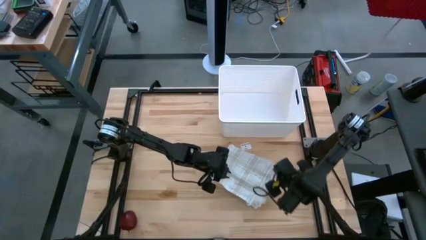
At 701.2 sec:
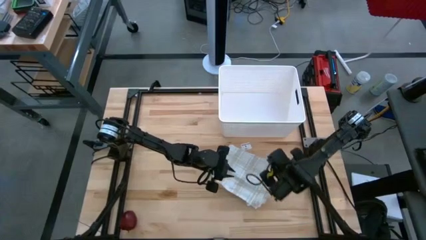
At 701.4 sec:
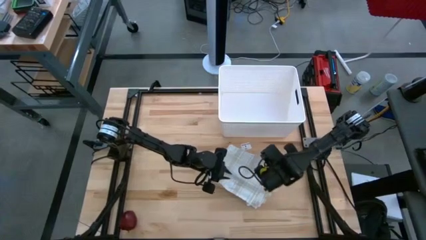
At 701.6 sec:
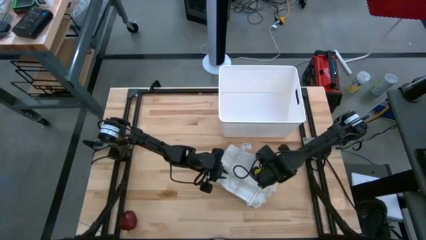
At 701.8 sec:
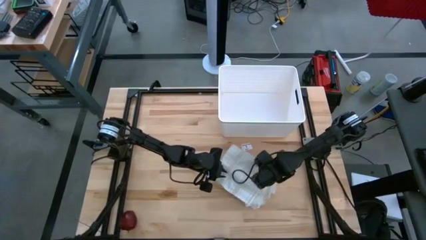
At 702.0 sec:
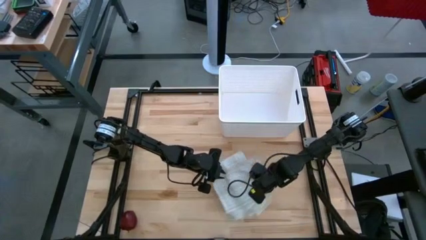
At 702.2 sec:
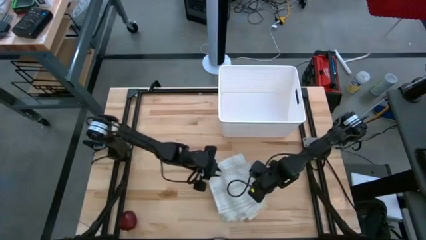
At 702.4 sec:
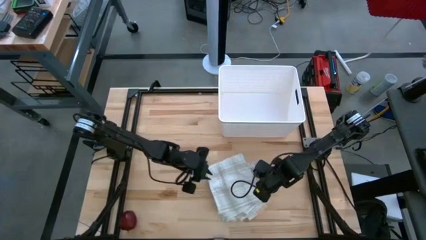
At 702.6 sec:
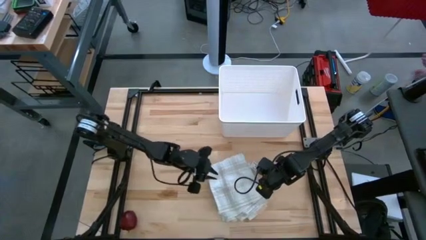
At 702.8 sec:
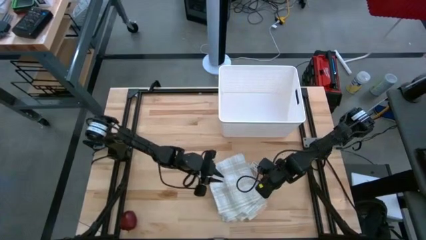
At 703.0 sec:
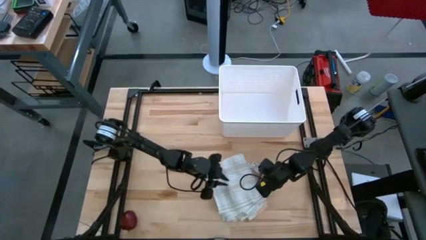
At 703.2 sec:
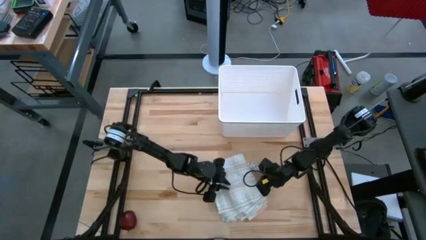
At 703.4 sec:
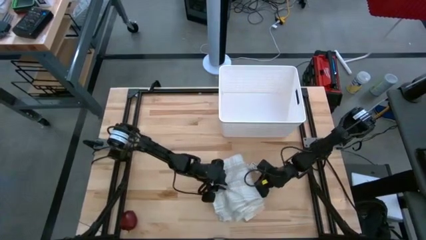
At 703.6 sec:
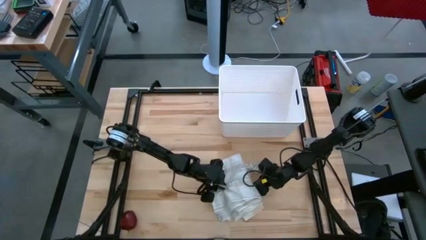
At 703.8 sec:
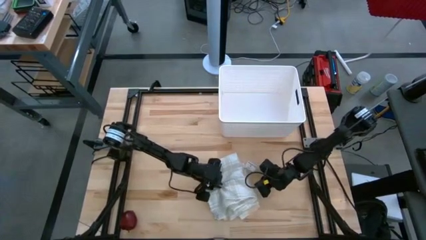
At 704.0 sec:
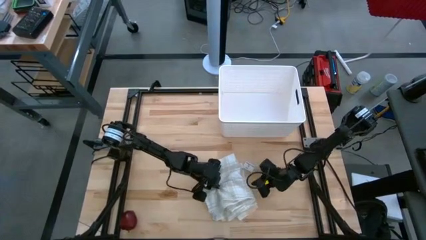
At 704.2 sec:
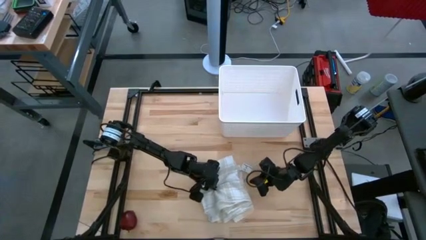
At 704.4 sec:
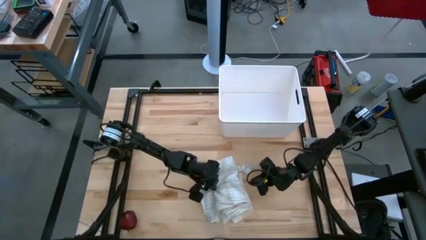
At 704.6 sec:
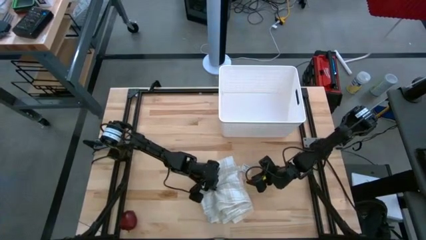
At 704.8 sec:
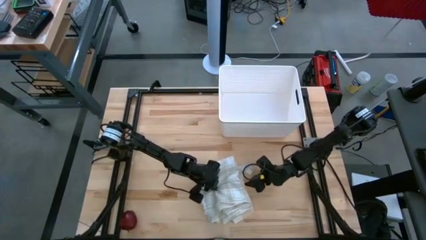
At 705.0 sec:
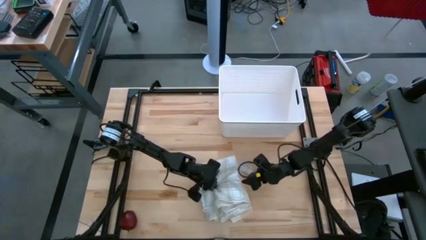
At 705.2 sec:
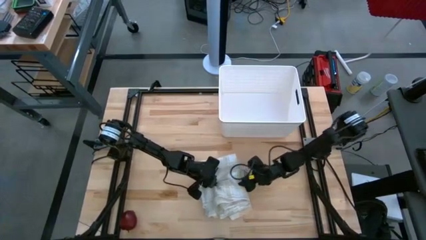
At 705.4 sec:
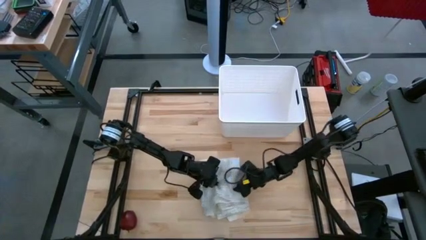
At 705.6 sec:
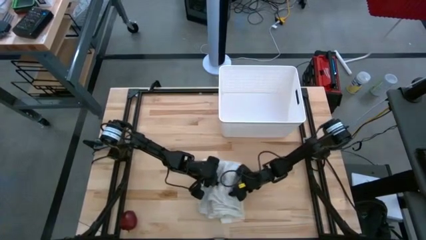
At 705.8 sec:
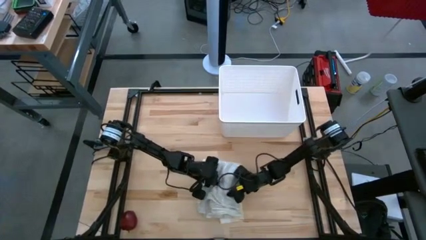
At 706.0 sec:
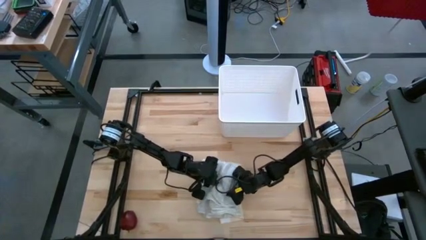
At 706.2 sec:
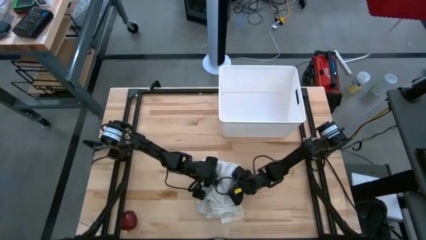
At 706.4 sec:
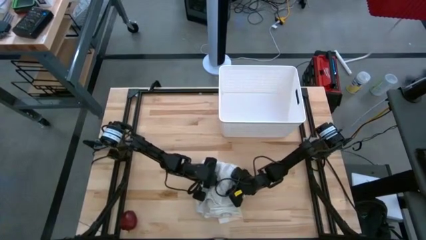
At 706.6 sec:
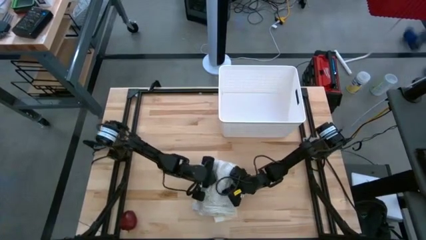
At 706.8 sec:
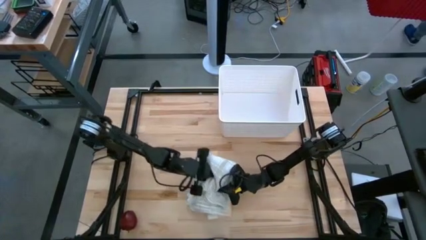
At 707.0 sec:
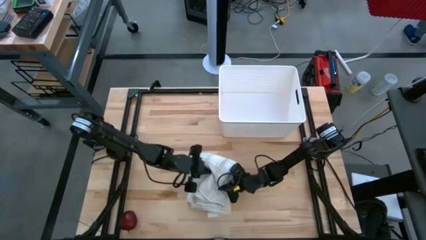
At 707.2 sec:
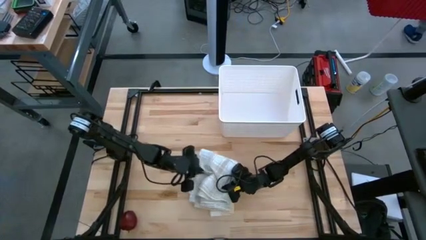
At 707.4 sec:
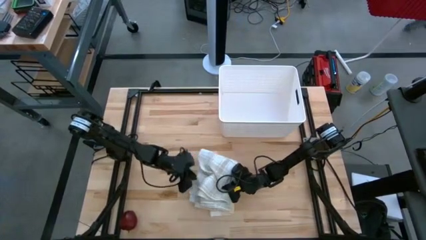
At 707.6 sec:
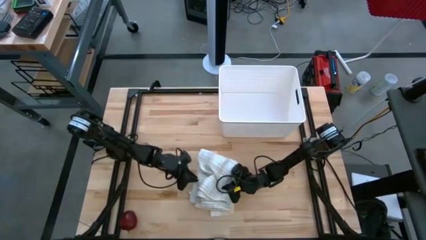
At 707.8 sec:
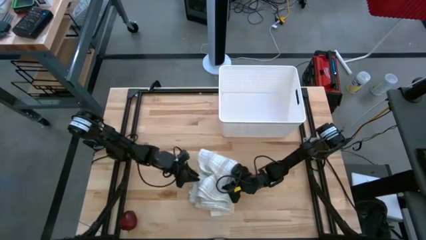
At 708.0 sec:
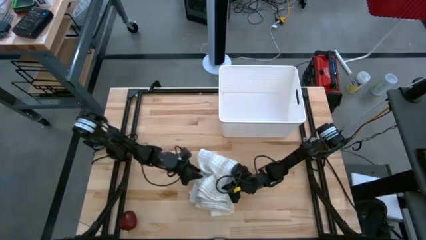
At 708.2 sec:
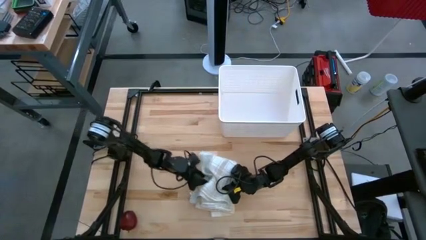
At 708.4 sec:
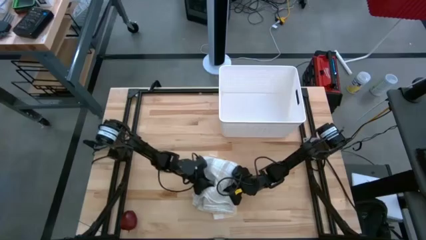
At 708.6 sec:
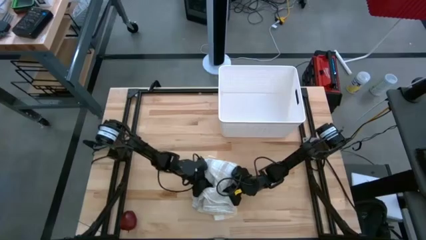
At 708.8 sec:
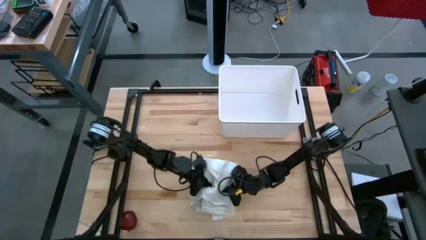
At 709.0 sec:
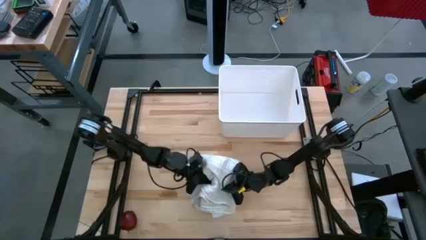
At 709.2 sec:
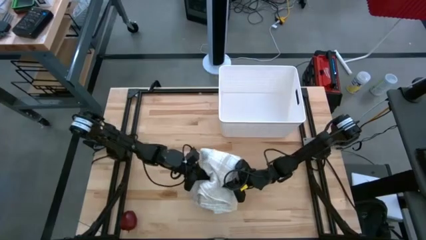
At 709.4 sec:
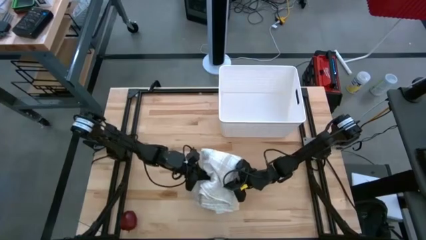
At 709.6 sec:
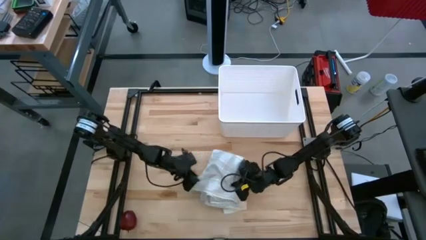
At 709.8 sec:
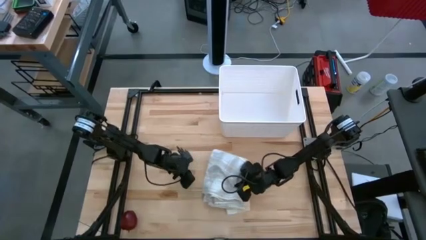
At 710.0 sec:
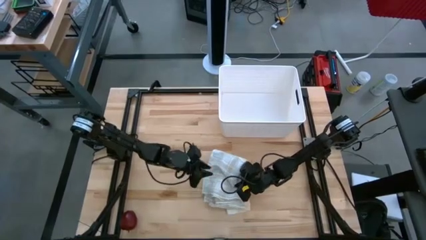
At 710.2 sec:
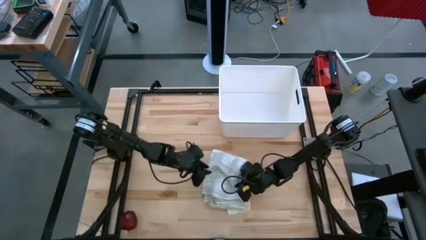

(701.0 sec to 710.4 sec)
Task: Fold towel
Put the stack of towels into the laundry bin

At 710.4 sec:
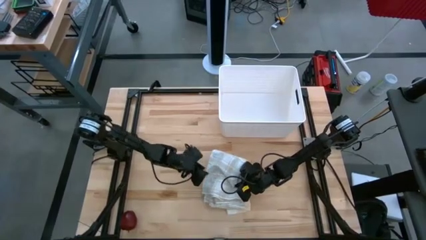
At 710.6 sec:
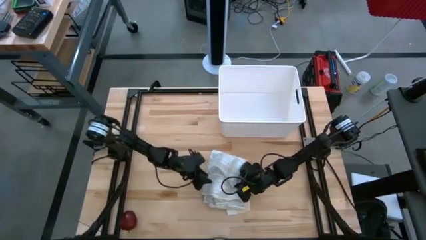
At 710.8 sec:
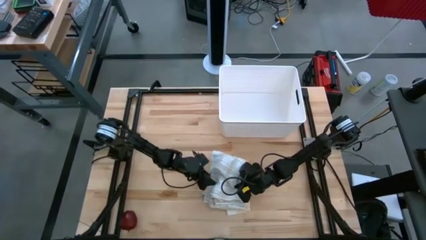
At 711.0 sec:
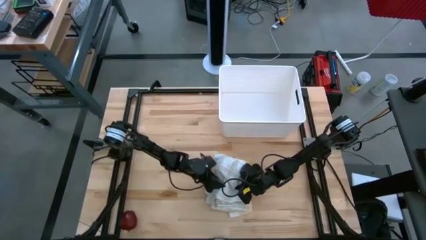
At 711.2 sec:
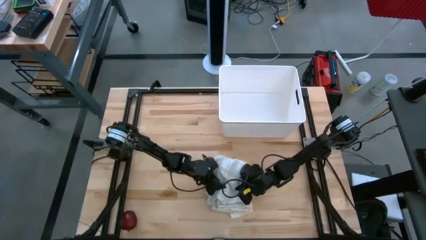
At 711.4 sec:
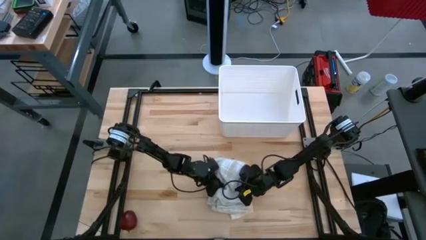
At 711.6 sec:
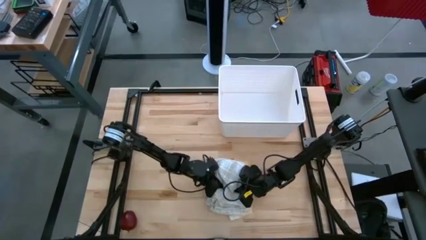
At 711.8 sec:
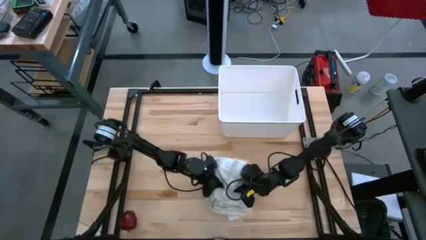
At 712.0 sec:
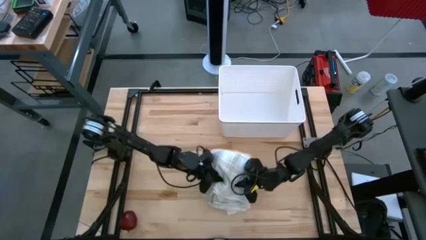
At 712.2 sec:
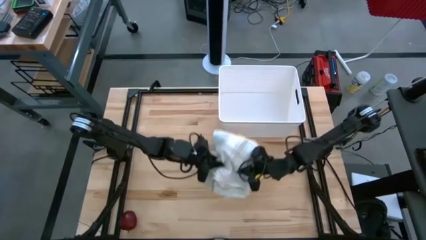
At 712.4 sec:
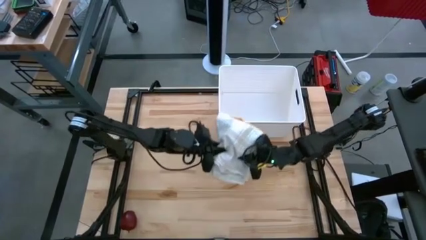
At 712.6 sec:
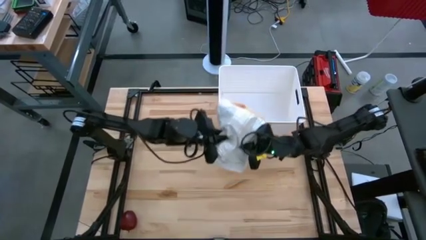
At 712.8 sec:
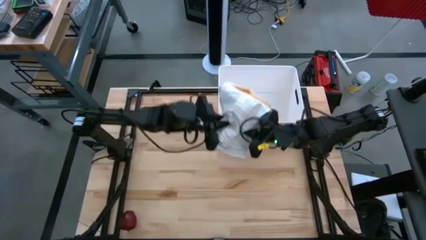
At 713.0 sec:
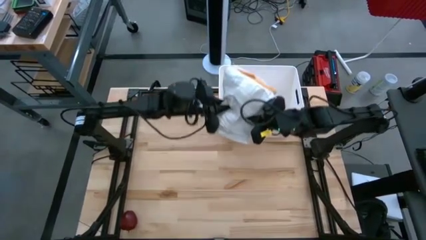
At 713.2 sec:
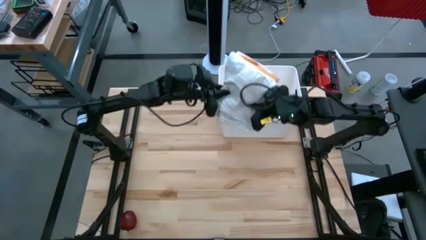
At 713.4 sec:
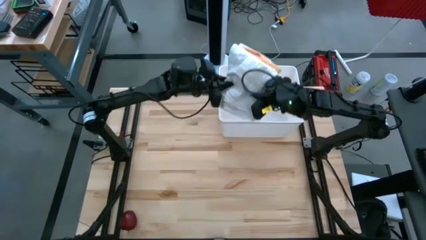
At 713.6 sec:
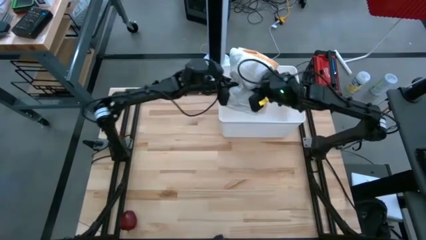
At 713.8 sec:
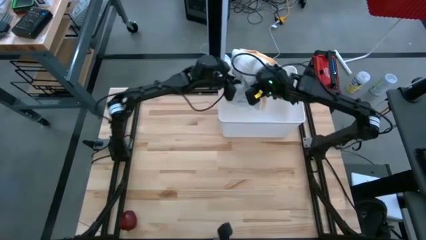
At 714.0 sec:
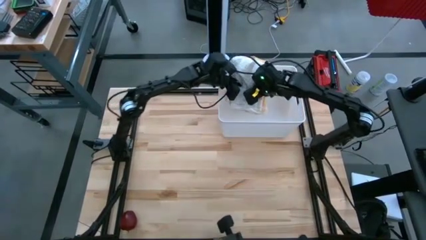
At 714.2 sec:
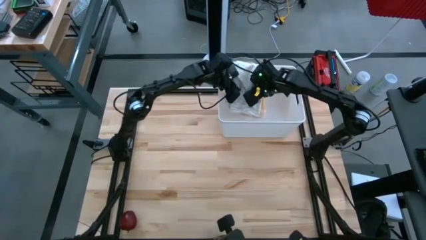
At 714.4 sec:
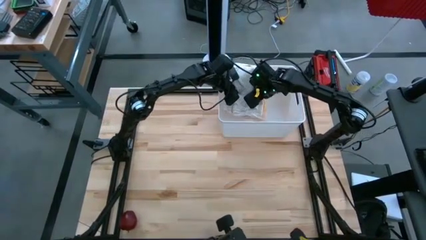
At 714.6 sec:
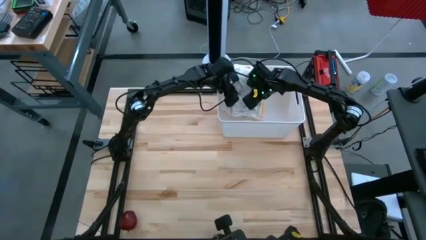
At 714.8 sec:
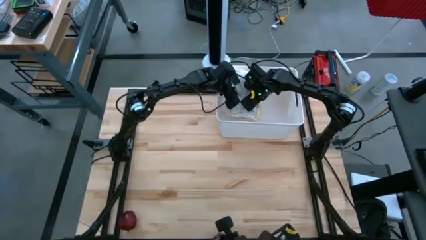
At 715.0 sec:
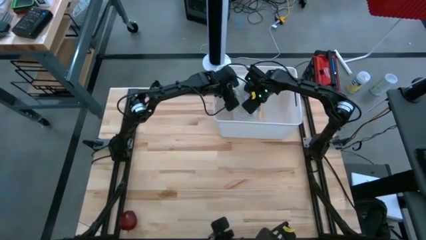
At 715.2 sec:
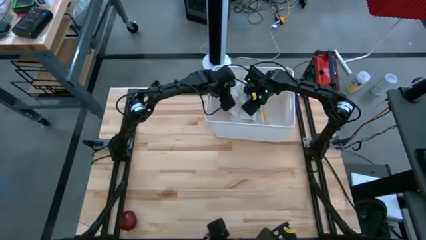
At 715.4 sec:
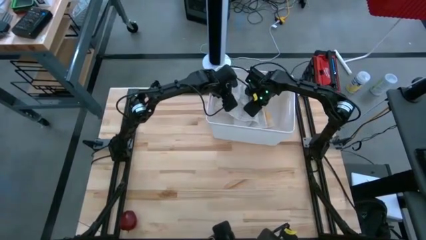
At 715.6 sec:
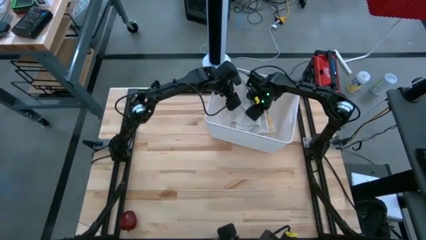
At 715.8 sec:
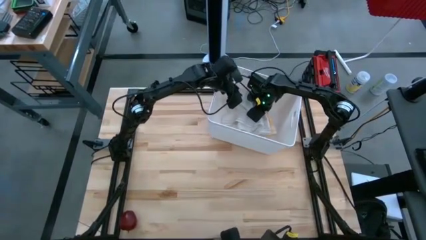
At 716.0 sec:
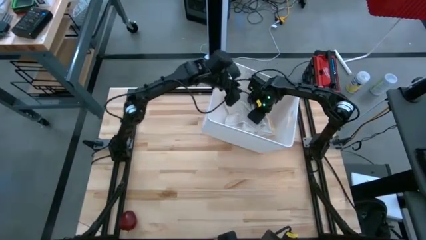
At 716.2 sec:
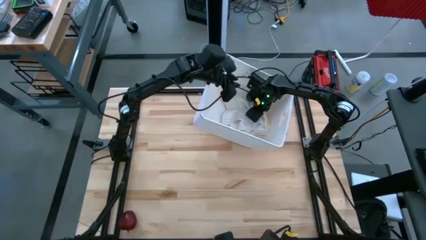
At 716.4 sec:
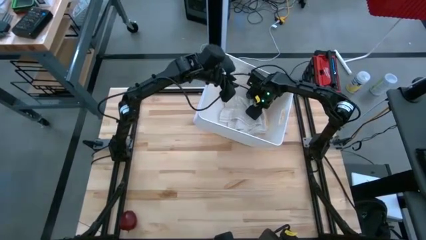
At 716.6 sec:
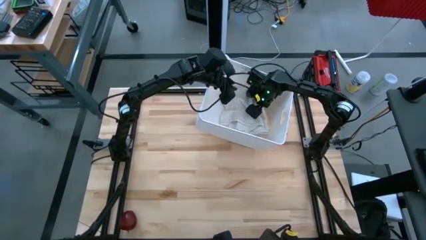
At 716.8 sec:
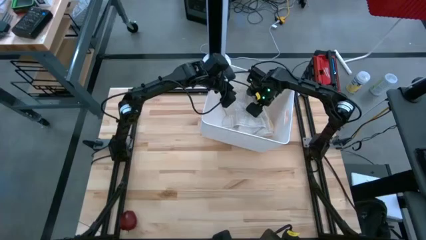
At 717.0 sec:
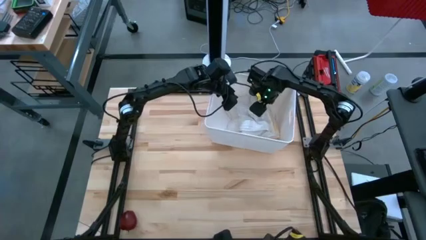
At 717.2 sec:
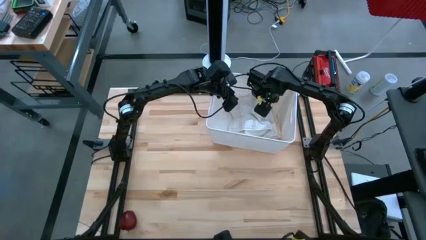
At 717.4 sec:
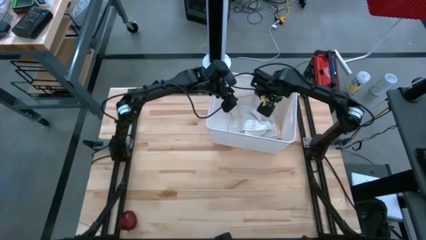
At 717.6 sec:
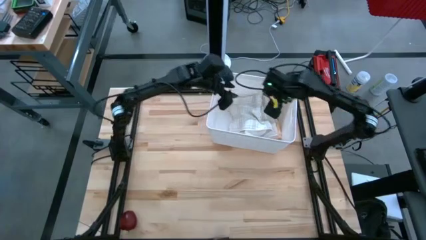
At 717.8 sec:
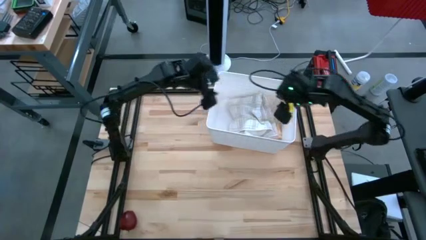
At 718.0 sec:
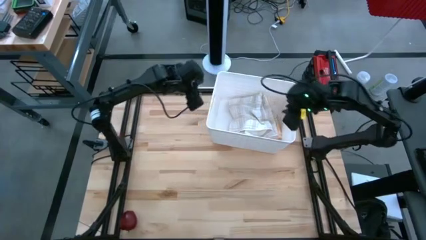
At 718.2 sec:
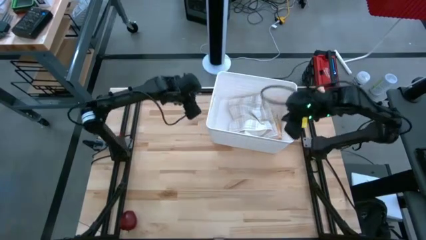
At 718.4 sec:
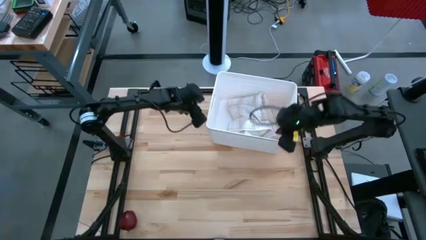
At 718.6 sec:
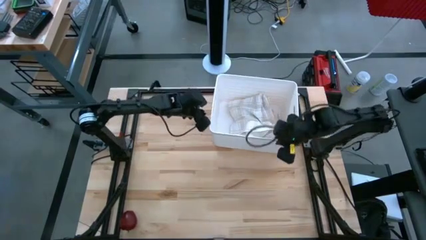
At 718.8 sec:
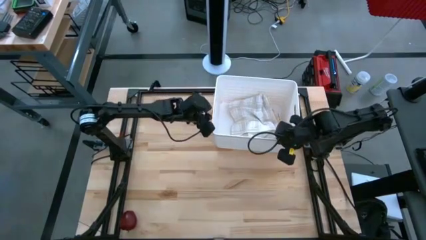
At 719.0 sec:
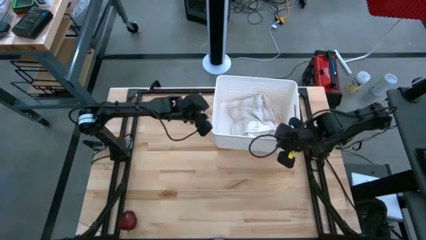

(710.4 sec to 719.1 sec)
Put the stack of towels into the laundry bin
